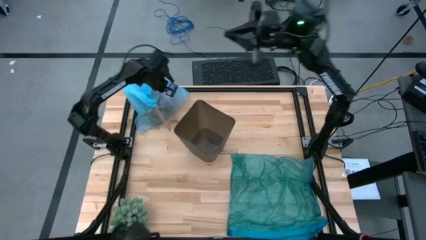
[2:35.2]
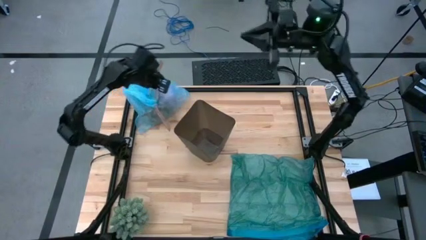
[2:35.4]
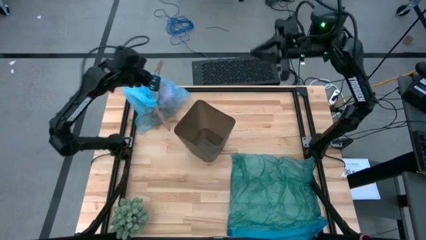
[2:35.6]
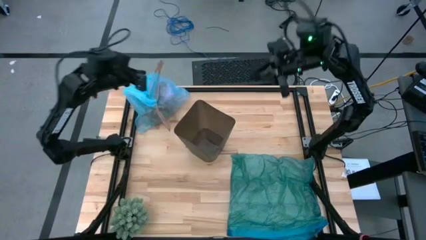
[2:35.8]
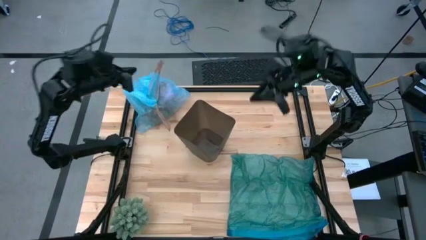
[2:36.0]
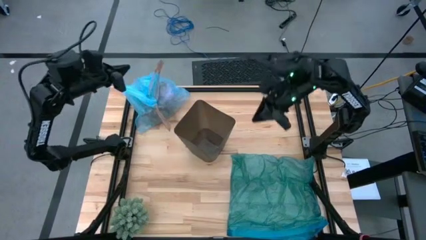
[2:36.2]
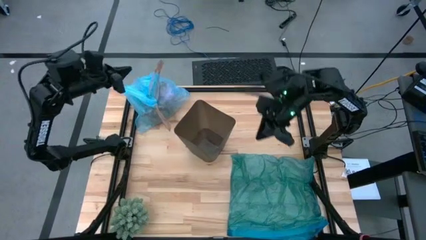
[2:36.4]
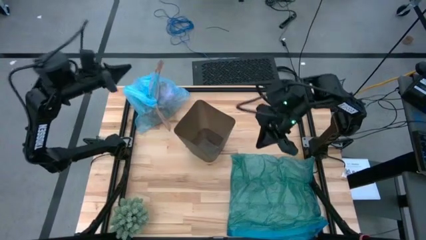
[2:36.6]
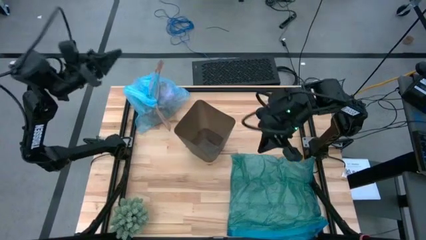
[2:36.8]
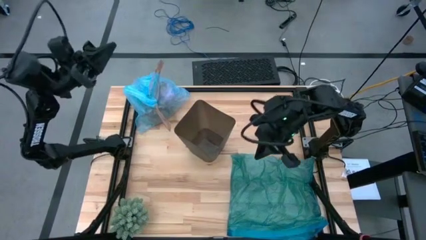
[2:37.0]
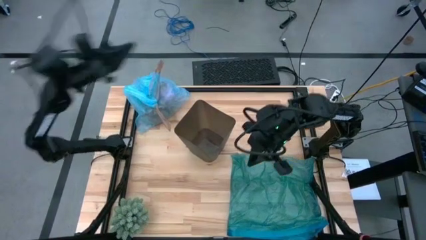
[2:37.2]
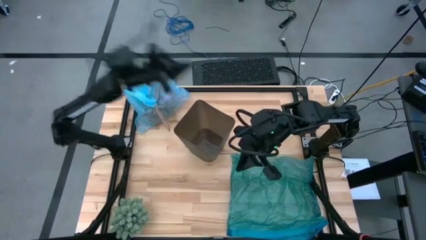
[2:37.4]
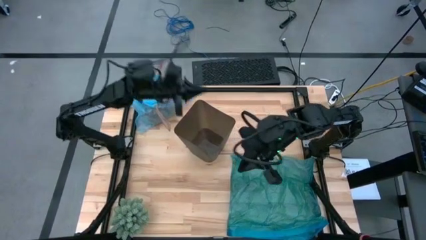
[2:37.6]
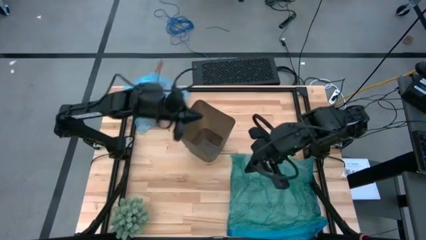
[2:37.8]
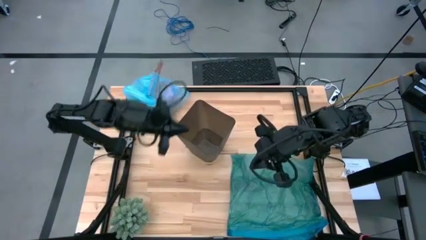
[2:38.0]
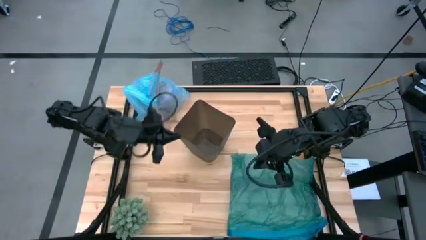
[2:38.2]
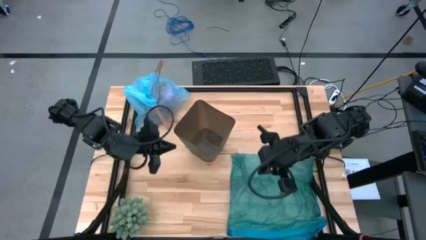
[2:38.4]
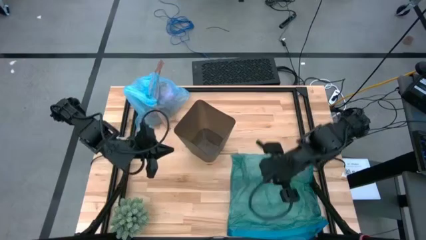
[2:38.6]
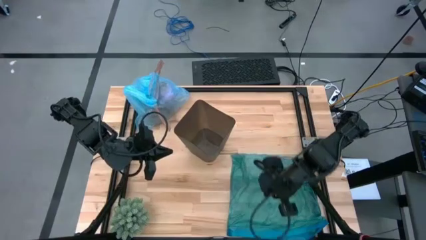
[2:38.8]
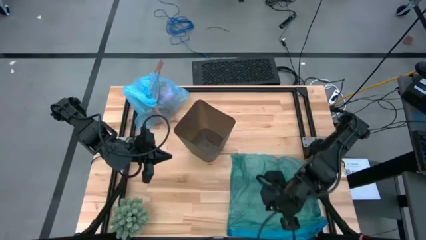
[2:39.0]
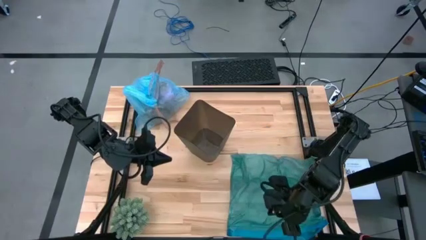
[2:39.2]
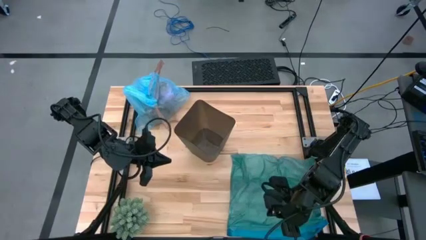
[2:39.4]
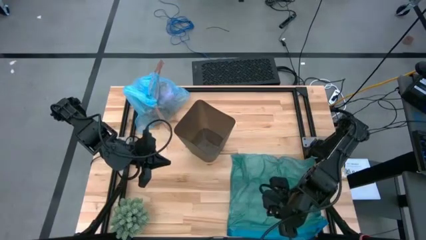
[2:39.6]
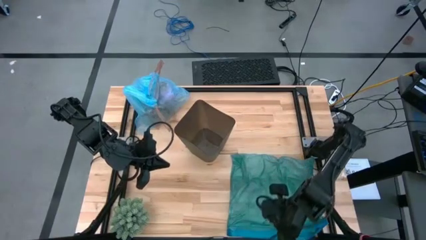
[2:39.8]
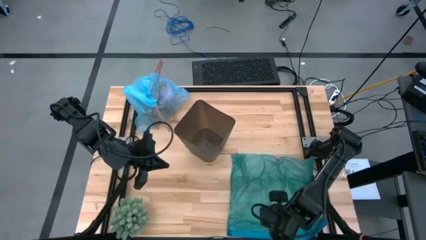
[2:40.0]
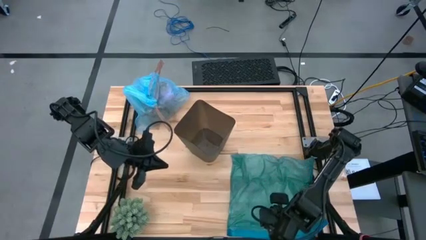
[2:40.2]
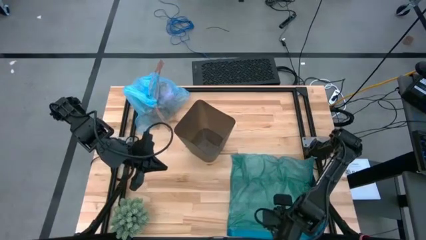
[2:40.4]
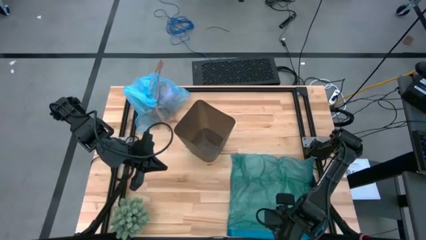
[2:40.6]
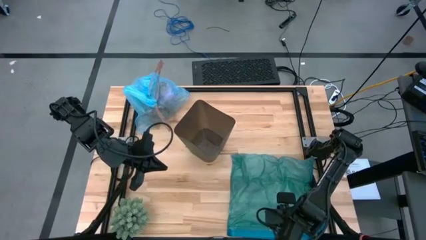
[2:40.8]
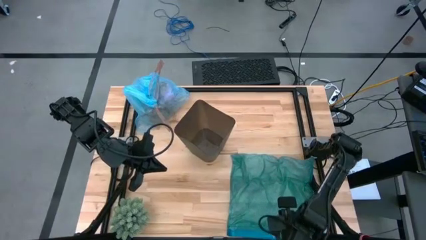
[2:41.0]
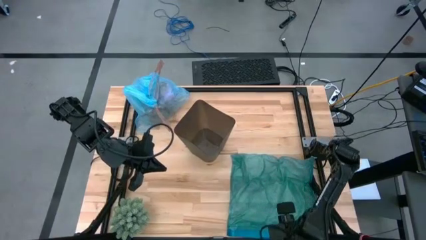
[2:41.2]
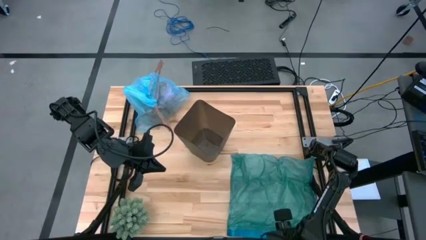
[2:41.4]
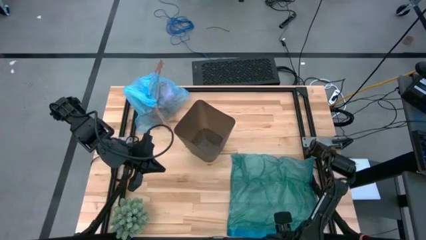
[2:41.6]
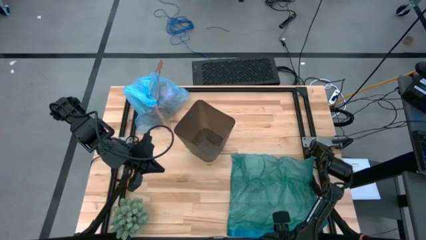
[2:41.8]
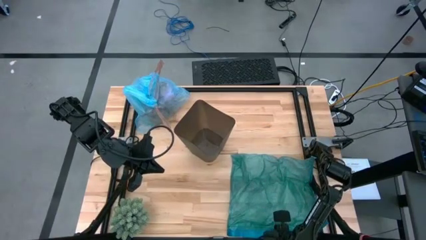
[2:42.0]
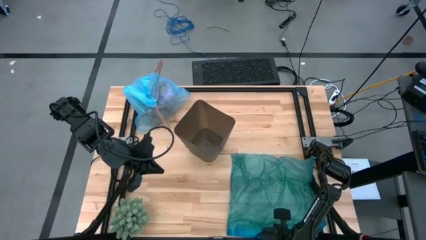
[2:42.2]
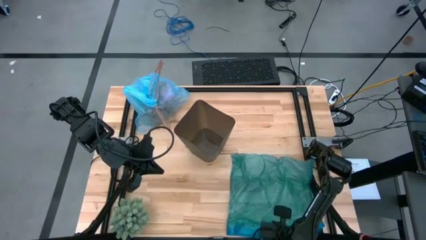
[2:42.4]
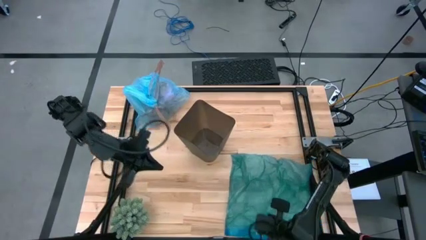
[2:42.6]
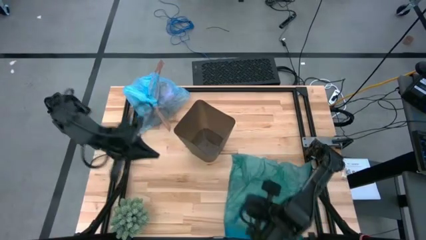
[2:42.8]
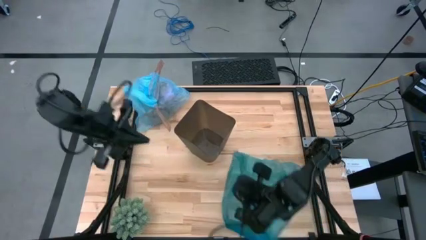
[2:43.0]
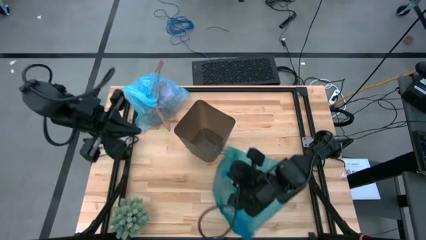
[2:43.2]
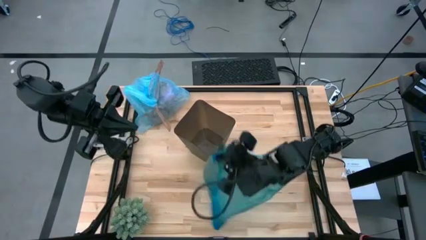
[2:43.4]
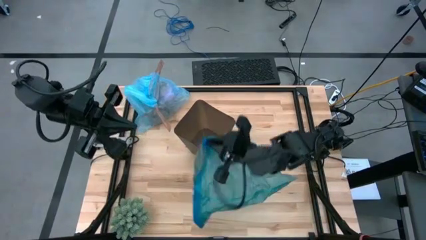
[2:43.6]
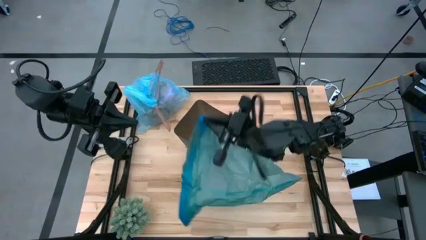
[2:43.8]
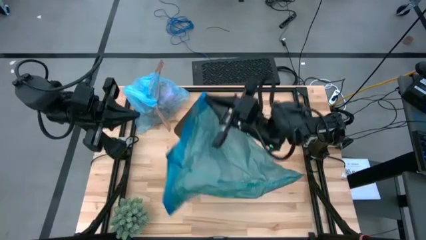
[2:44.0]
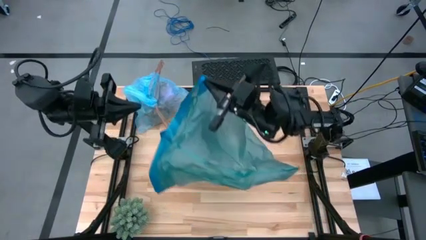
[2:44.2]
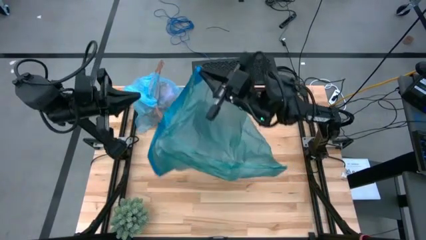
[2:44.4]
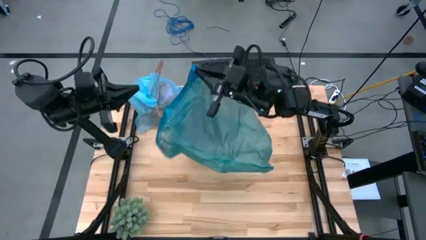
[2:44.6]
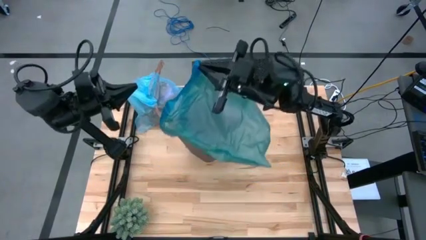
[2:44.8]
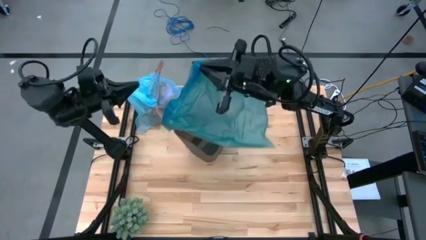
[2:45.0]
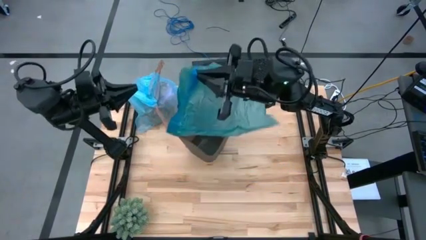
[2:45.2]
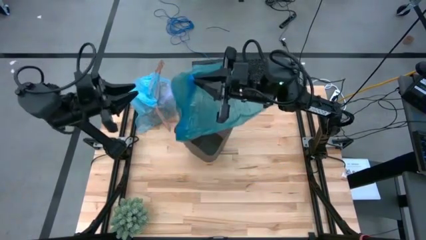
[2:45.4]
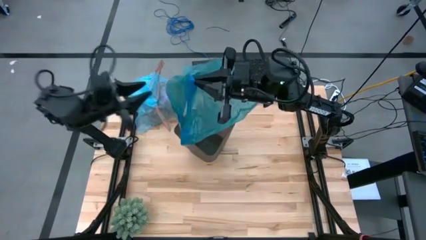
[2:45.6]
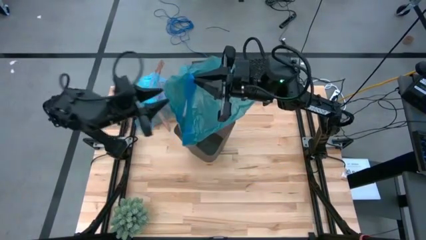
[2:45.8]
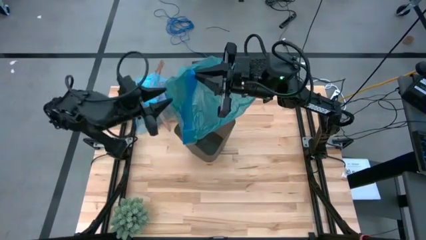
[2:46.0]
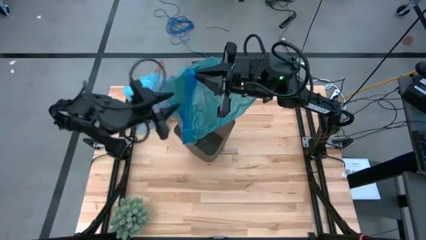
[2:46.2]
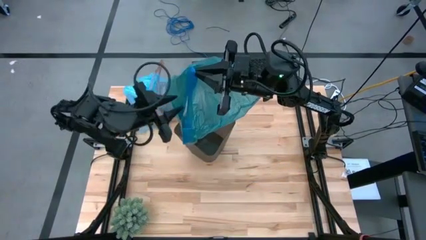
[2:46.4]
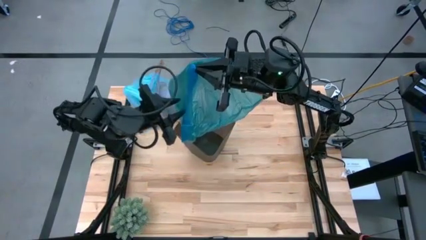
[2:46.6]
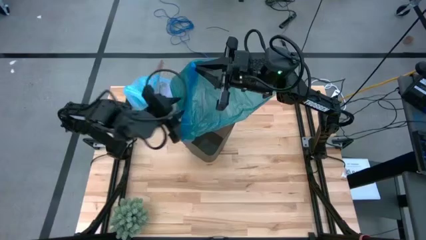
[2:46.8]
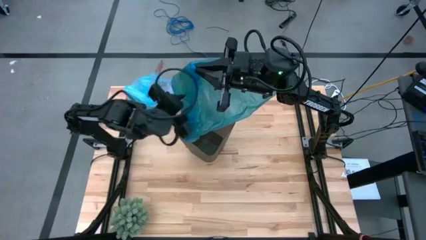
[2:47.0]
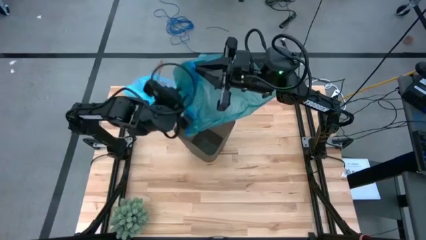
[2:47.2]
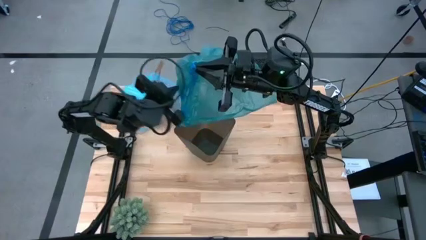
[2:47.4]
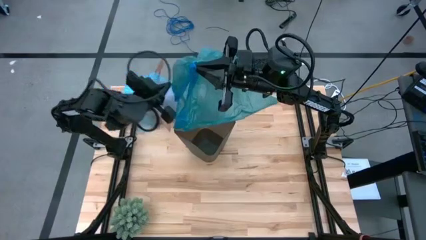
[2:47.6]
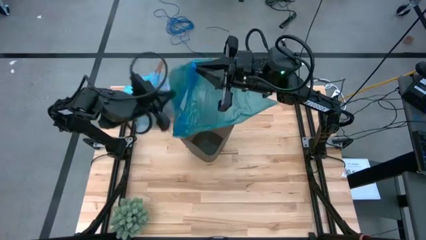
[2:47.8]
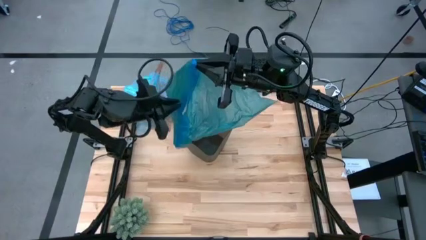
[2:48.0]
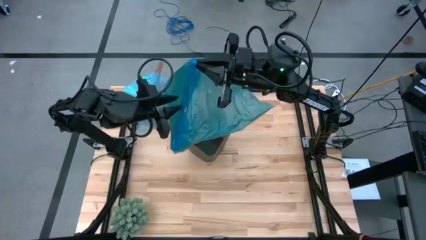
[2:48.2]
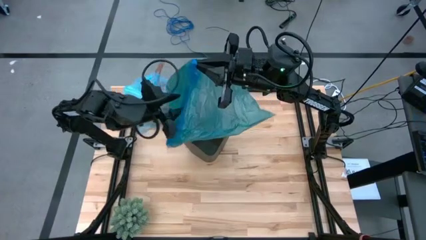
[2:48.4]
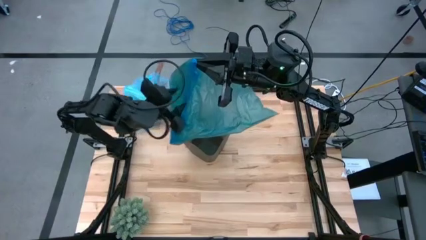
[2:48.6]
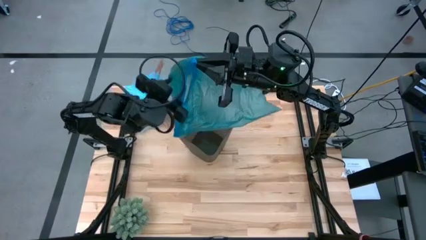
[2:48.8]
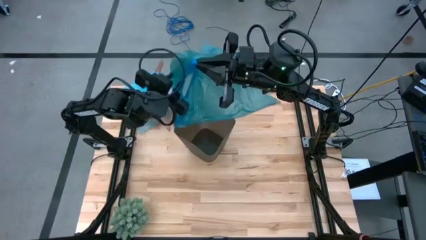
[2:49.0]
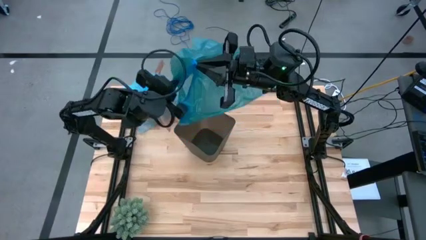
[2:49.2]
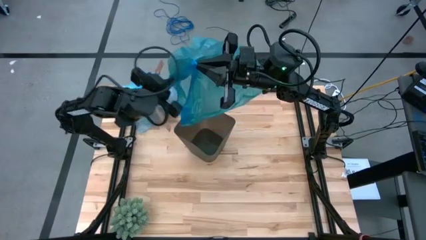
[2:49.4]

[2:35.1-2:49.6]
Task: place trash/remove bag and relplace
Insert the blue trash bag into the black trash bin

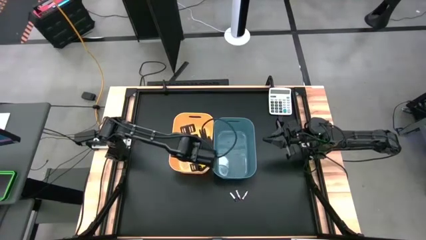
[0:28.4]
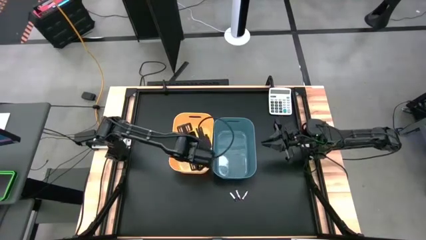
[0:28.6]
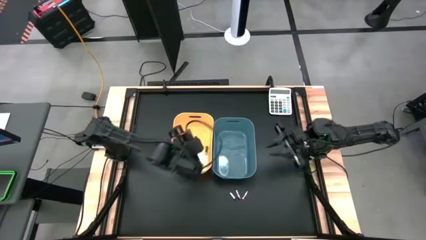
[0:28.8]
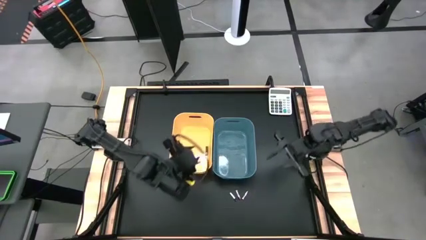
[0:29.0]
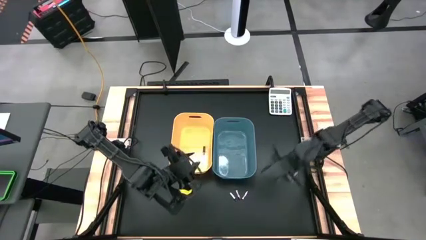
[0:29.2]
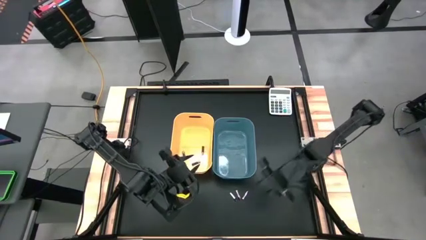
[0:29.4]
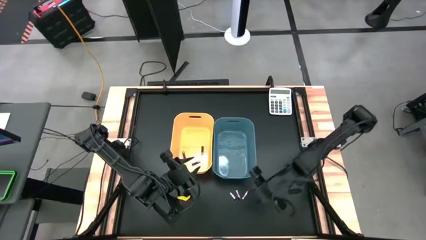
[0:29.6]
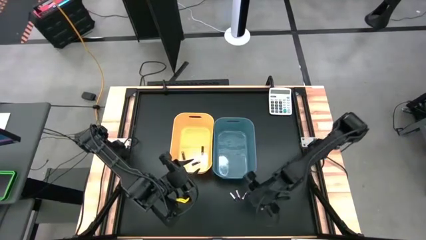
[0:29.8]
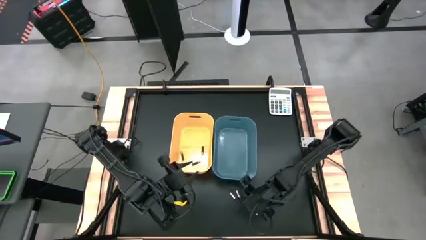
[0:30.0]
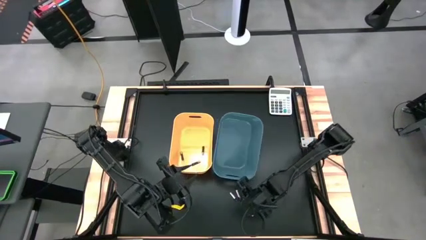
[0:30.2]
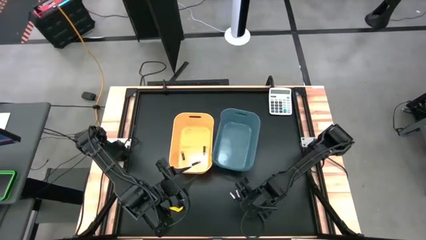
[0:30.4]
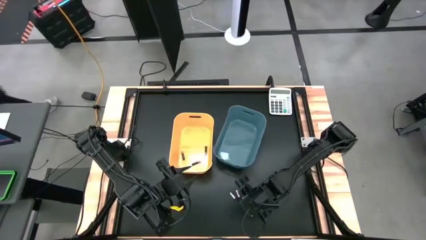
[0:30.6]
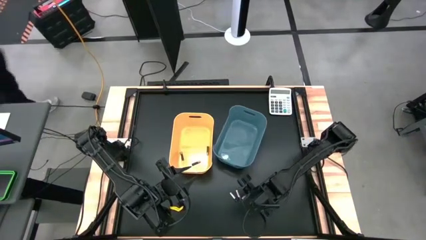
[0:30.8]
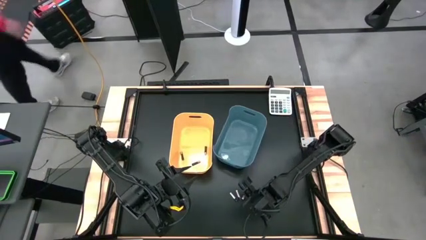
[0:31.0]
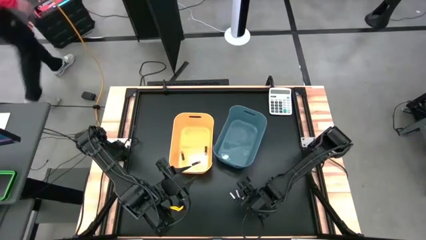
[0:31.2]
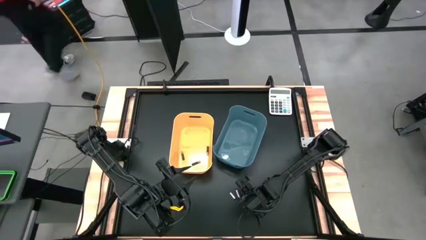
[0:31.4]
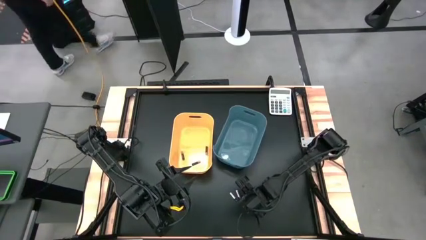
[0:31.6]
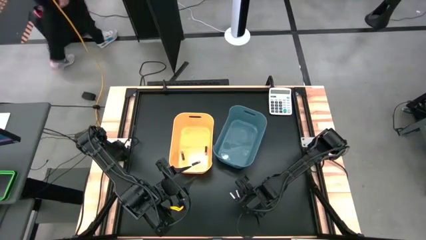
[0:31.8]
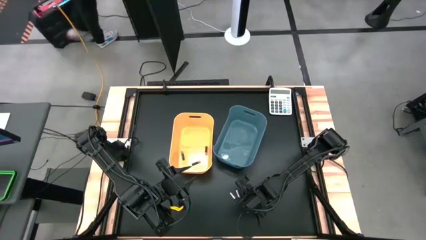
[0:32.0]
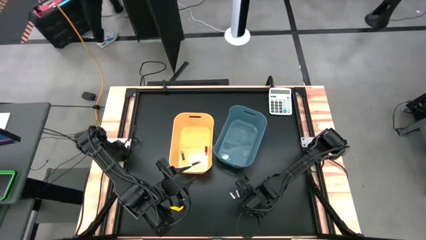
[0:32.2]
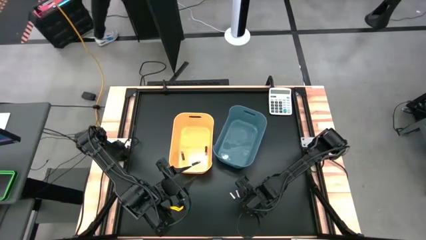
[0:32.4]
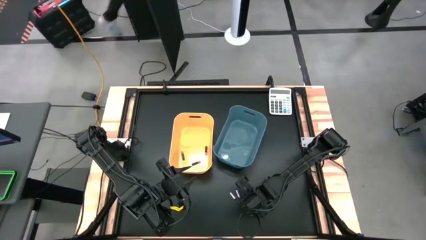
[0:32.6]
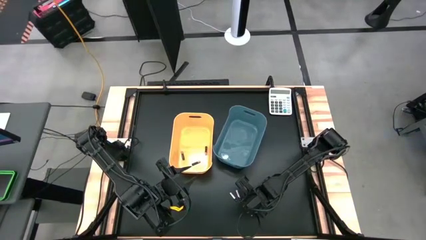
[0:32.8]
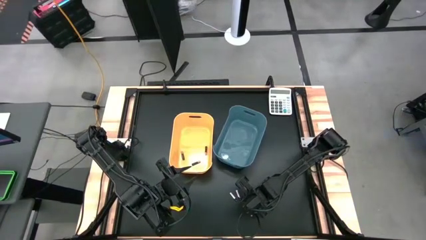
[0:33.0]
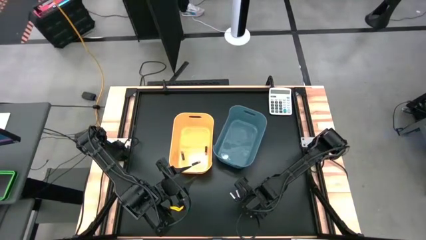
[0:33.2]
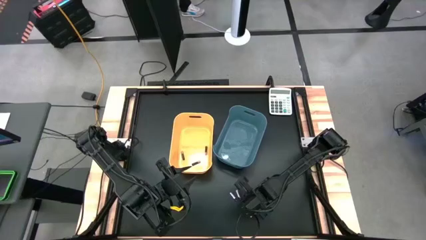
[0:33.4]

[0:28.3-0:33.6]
Task: Sort batteries
Put the right silver battery into the blue bin
